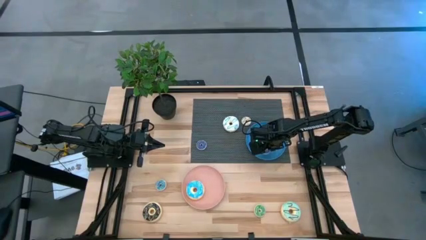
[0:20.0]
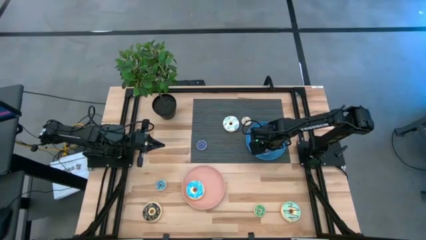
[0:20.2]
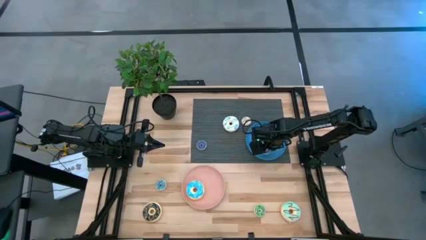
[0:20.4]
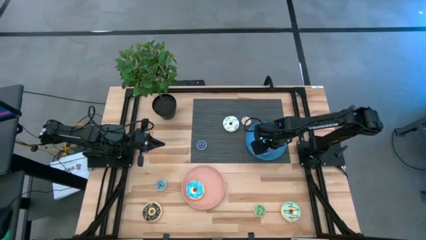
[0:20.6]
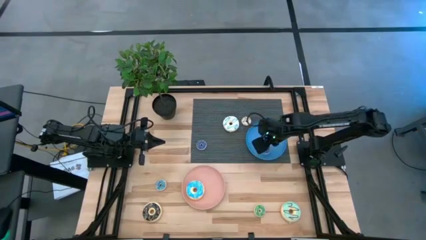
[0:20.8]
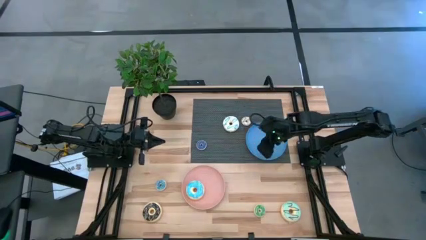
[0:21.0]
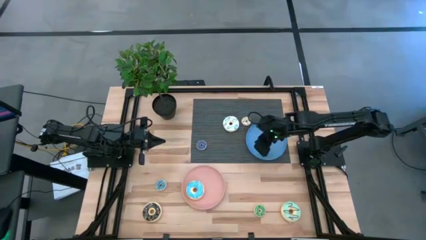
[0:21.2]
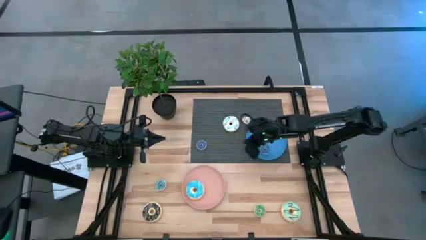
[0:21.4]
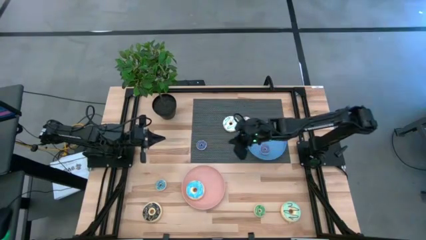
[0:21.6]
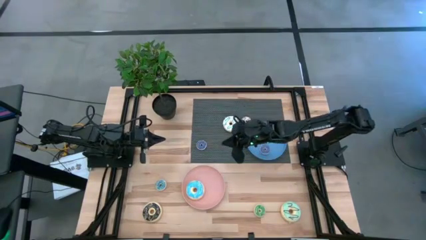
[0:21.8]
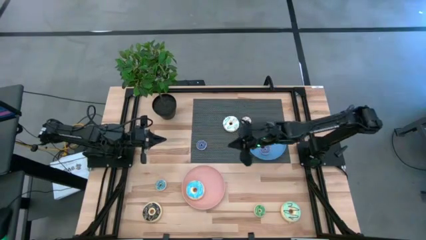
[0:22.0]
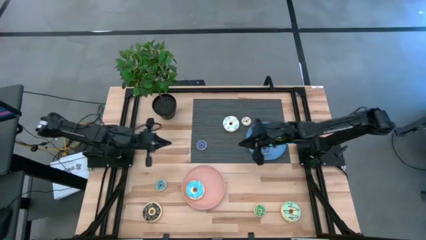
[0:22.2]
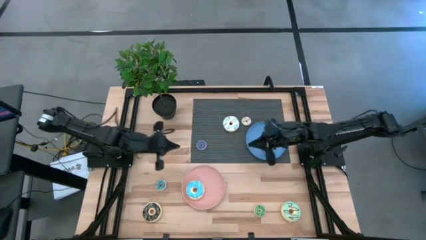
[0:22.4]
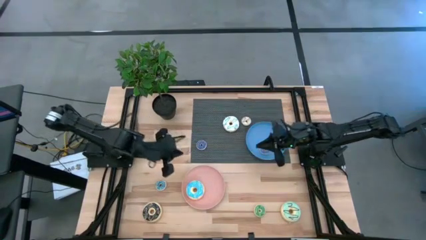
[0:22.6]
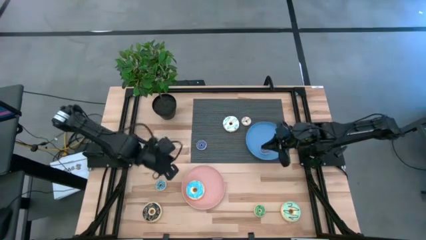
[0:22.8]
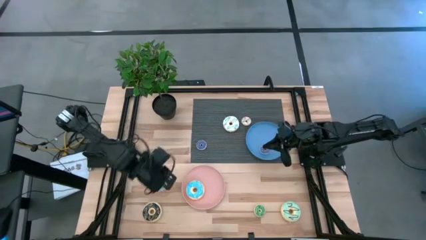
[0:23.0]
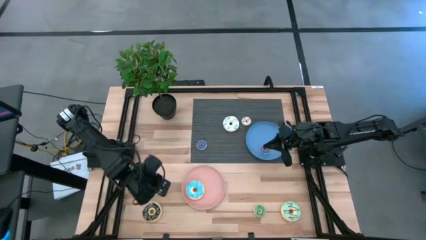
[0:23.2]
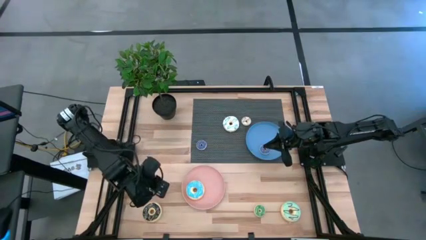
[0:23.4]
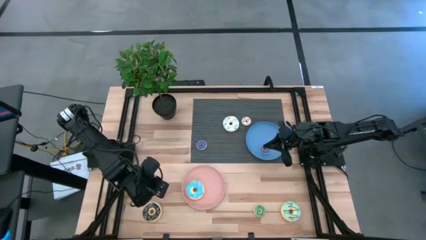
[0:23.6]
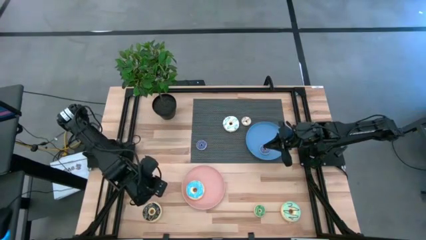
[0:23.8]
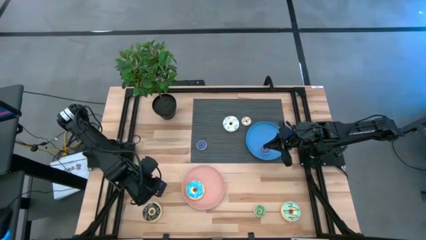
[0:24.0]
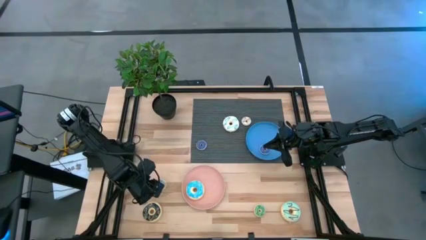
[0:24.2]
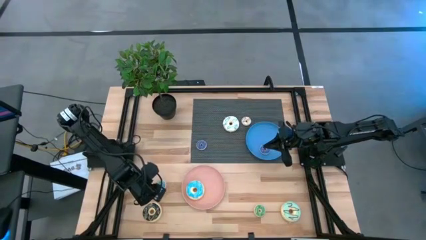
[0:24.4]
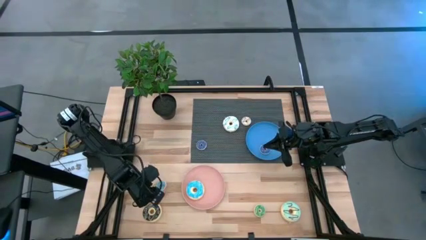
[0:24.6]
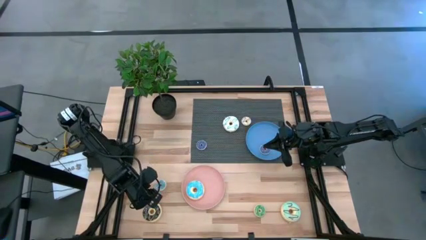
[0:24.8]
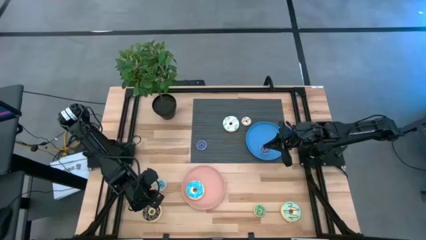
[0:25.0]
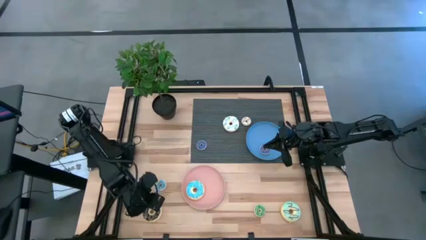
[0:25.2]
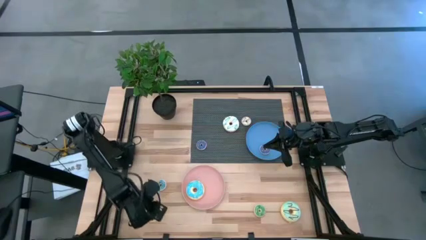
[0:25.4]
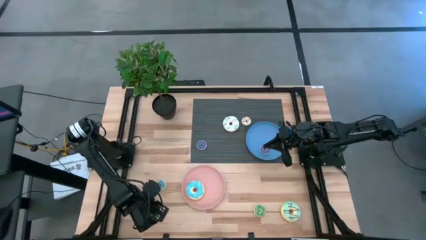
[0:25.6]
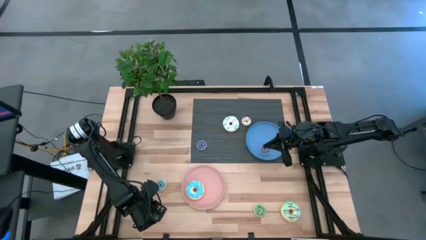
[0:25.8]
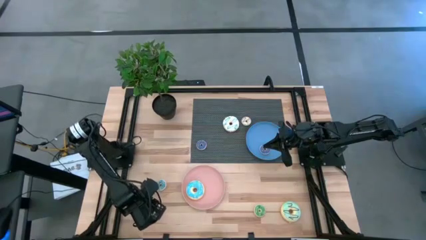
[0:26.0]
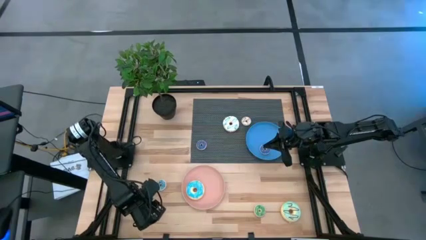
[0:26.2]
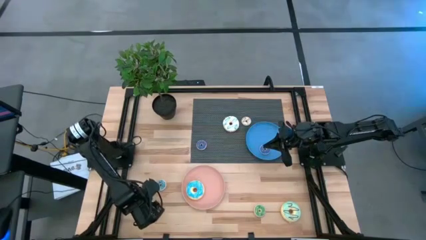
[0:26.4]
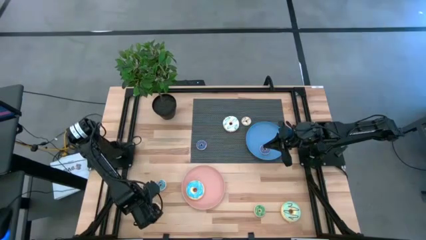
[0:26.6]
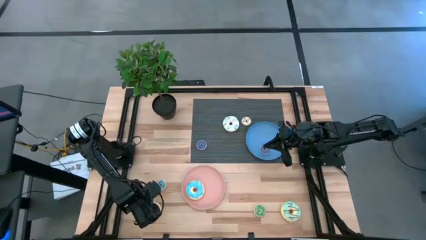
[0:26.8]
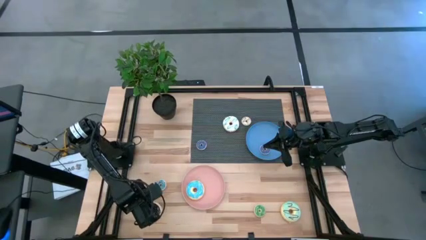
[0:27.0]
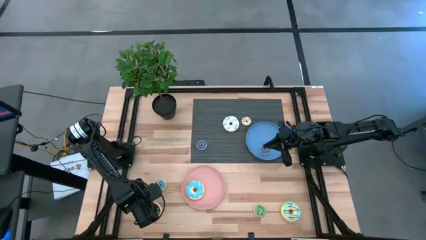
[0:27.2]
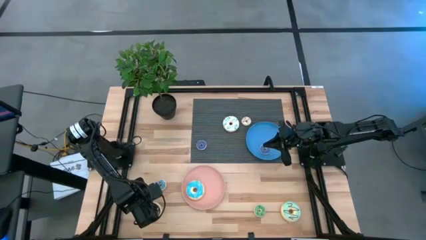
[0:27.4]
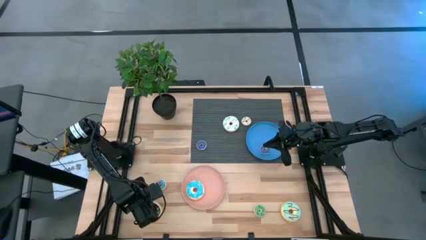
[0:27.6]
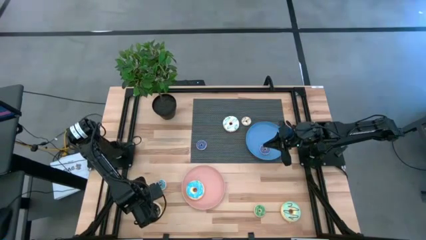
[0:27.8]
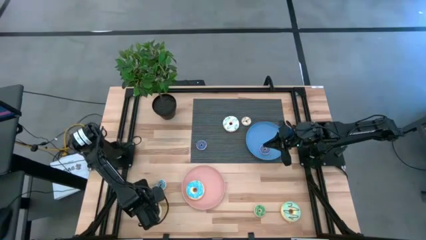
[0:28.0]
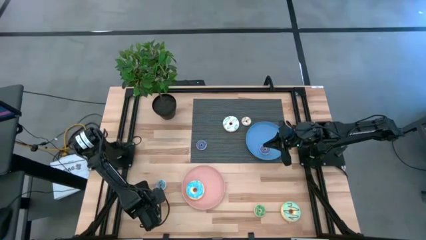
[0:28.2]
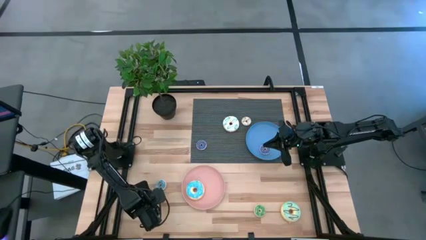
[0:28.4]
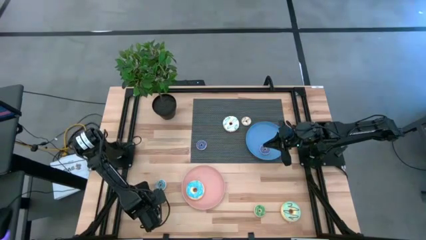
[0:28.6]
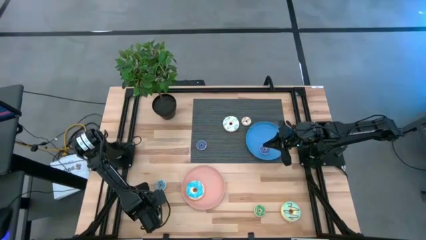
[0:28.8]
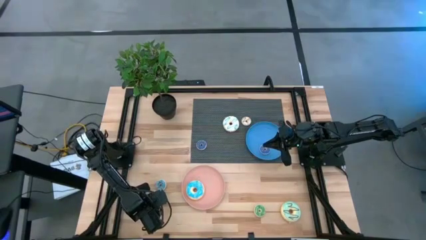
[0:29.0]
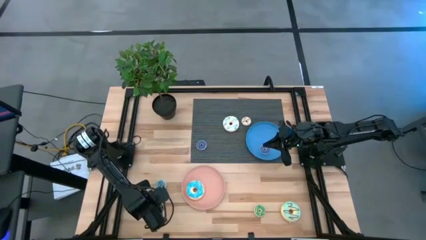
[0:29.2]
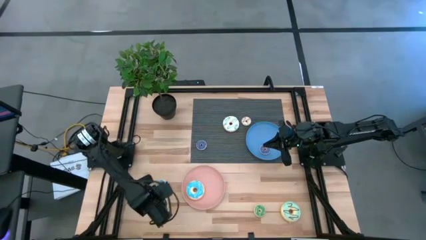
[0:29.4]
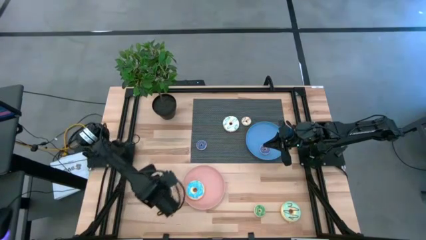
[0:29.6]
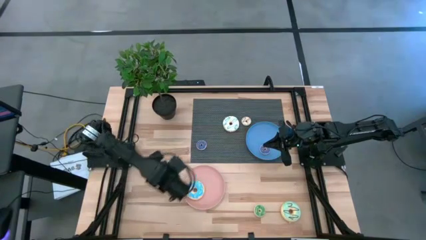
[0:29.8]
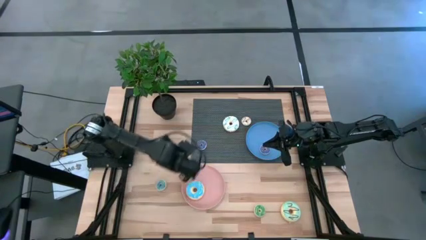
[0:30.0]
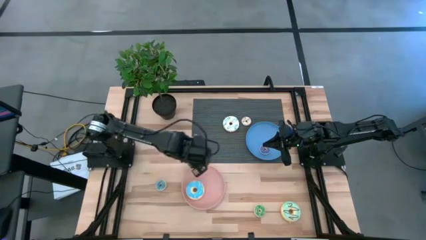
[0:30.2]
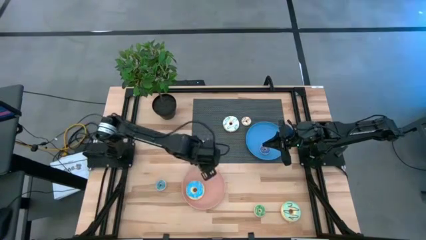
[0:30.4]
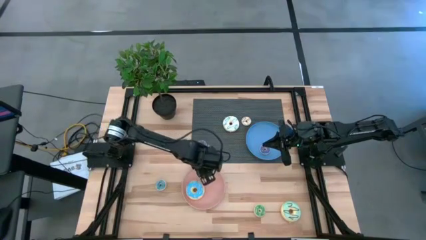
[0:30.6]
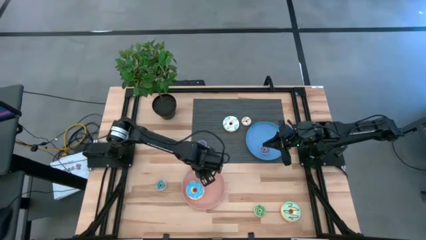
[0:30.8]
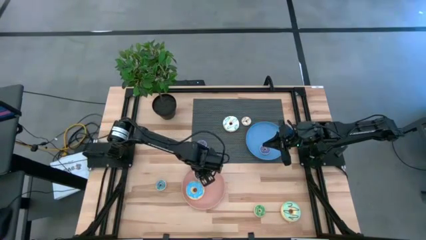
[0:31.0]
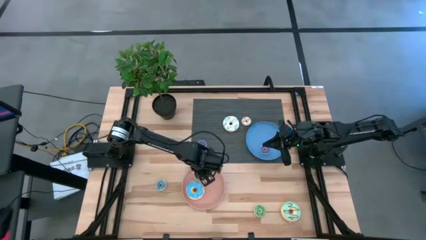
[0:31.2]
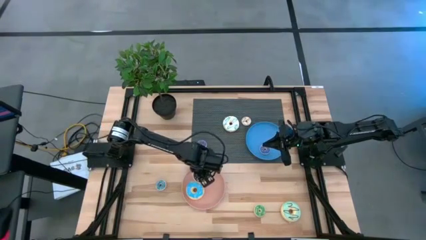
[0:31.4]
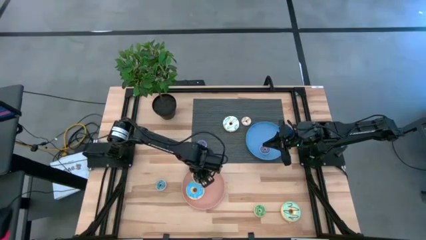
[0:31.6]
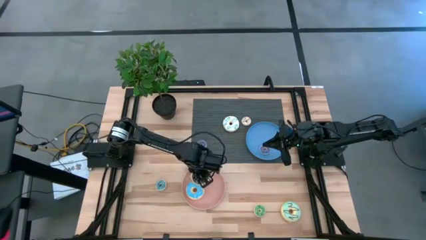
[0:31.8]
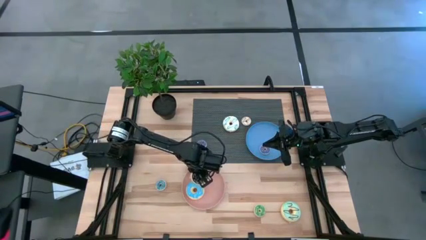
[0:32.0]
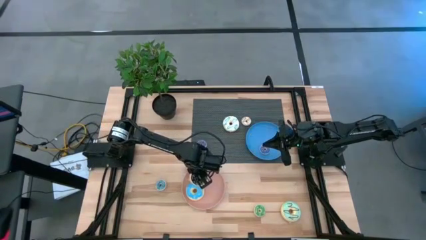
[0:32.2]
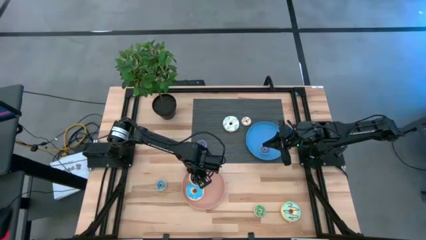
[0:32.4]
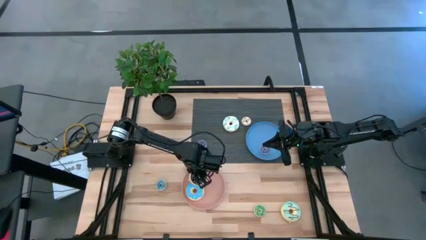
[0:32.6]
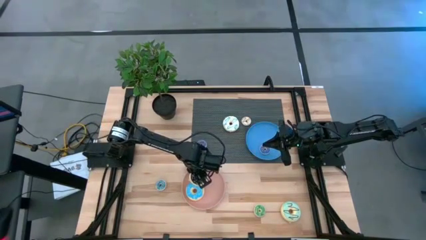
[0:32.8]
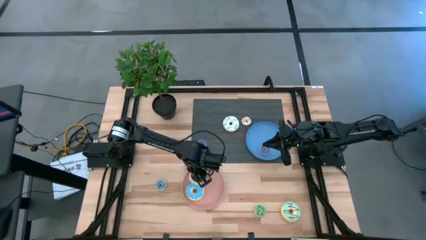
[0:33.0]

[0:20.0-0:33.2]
Task: Pick & Place donuts
Put the large black donut onto the light orange plate
